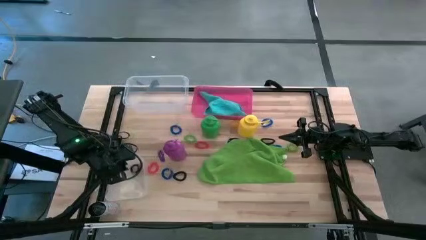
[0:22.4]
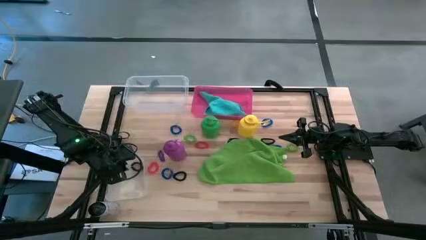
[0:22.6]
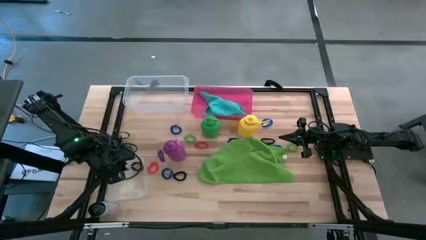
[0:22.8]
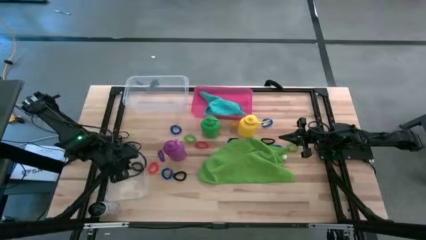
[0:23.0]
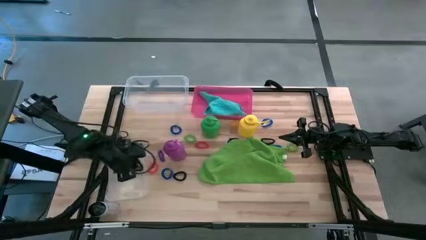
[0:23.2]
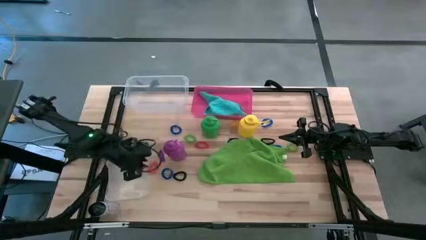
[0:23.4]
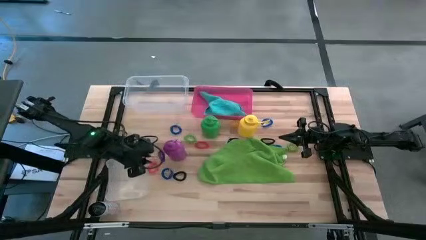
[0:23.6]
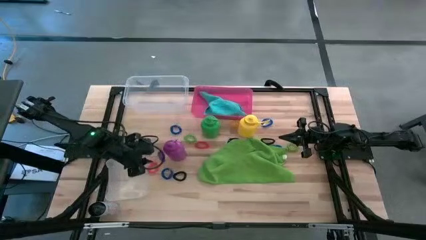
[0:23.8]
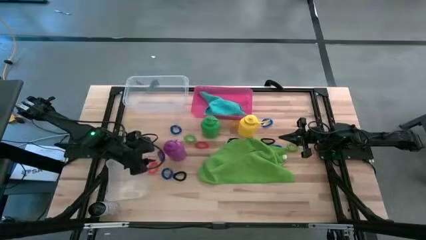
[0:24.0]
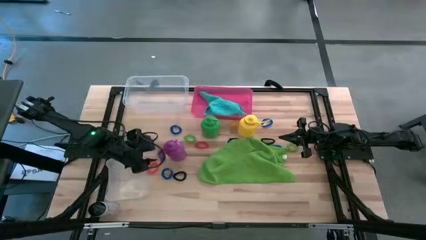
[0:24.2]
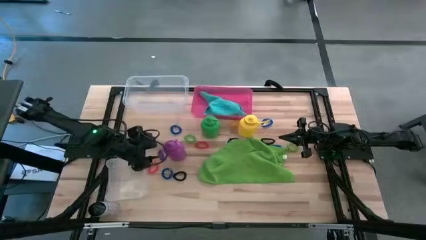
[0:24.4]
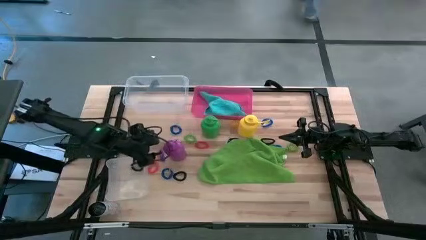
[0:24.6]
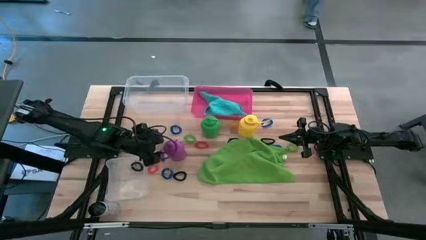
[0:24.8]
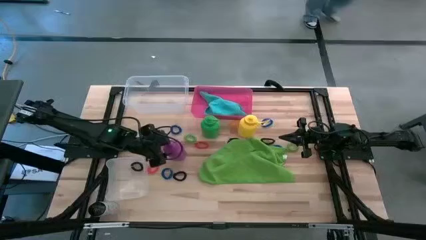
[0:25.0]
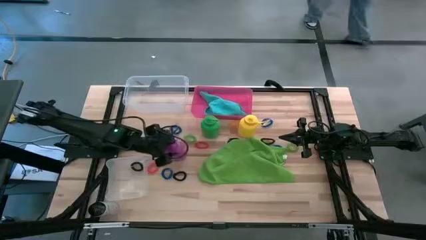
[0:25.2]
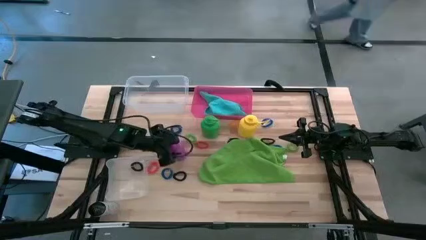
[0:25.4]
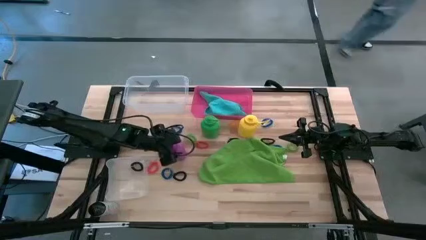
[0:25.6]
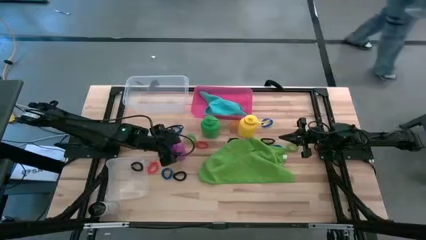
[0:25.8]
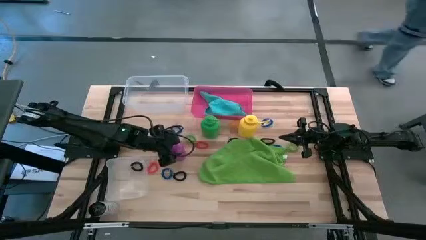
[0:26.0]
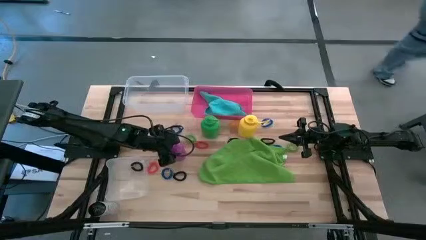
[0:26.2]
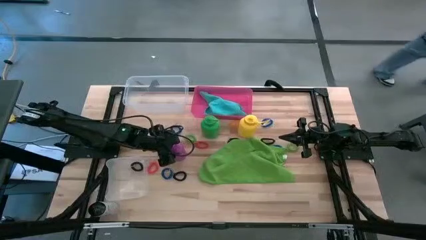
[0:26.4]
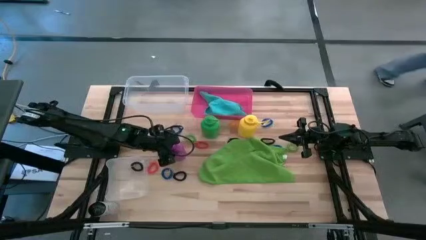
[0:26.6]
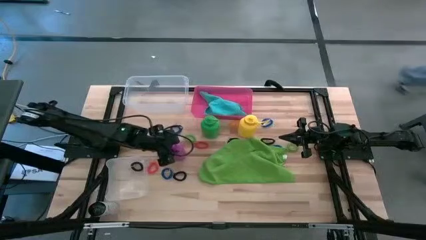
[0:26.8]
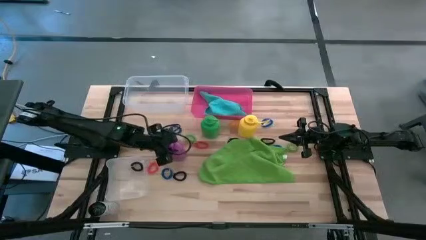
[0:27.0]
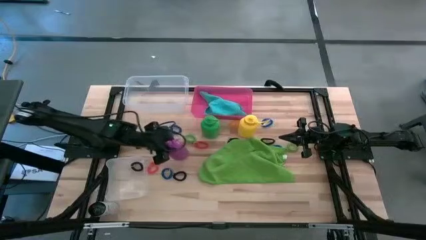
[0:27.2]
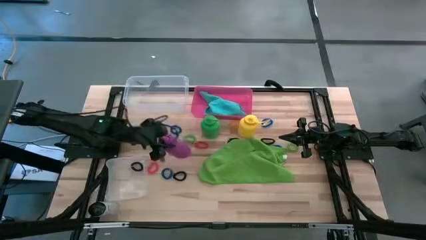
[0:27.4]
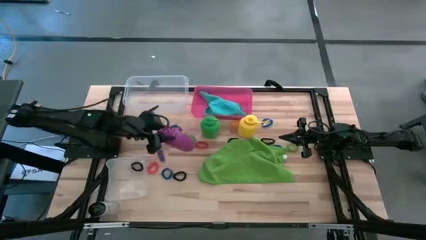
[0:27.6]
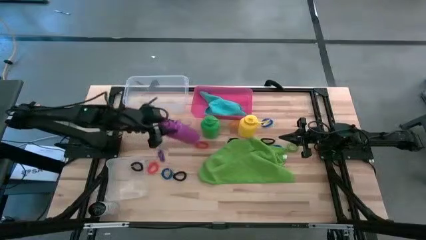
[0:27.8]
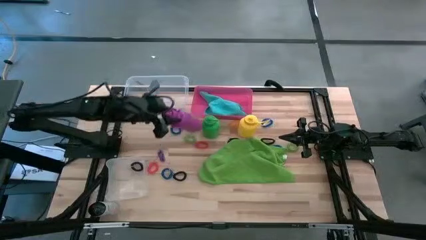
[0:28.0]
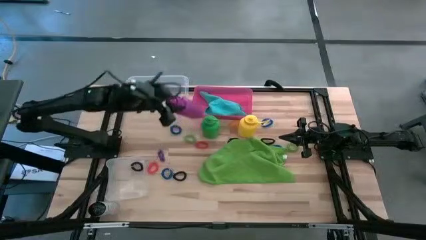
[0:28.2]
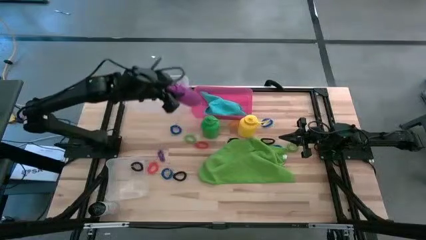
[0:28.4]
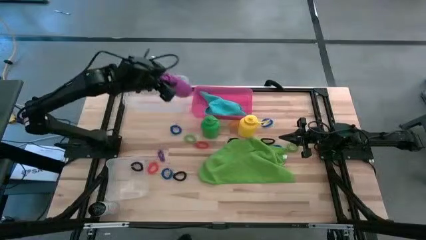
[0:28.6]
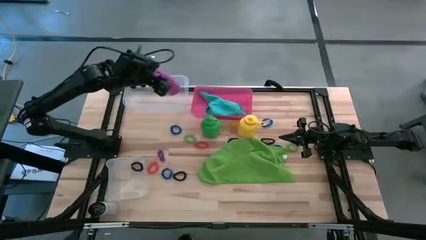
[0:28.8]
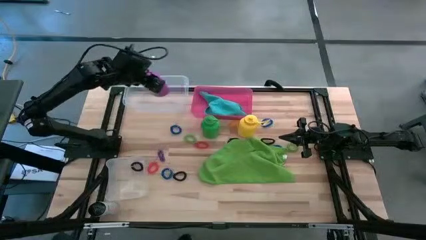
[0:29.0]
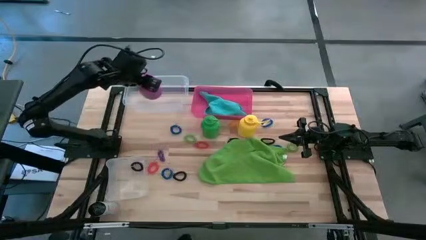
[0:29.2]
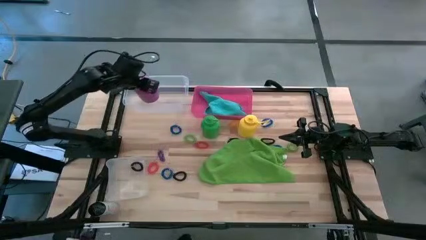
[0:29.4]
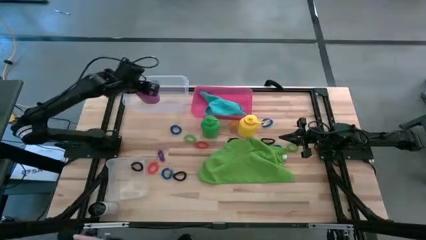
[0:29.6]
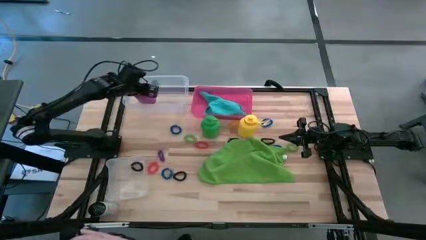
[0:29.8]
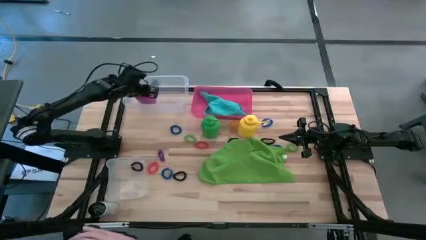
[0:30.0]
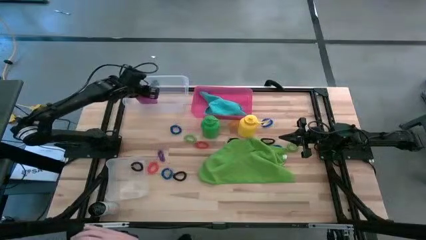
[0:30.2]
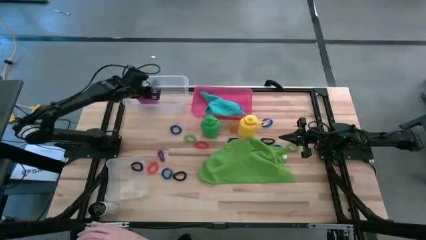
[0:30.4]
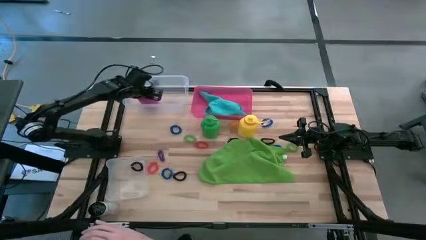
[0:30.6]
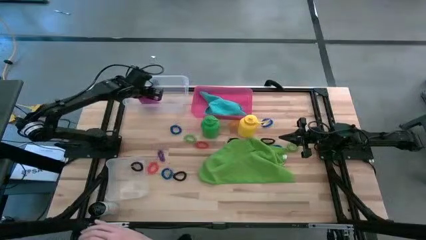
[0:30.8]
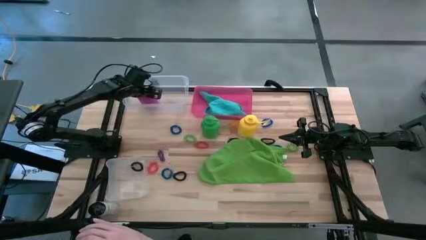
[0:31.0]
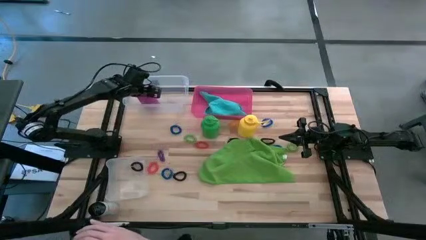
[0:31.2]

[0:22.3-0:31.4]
Task: Pick & Place Sports Items
Put the purple tumbler into the top transparent bin

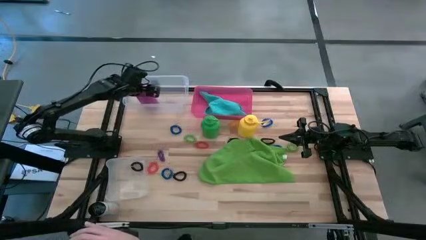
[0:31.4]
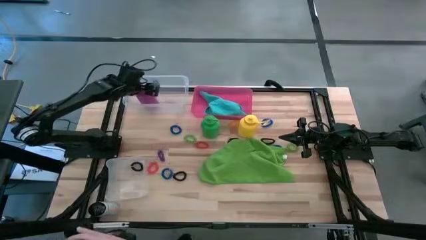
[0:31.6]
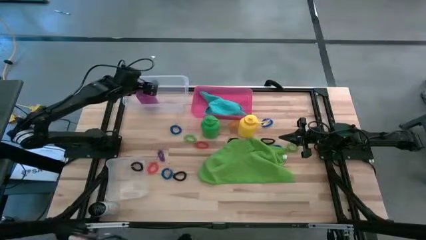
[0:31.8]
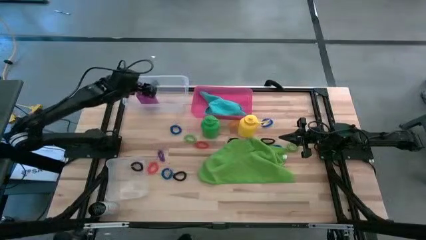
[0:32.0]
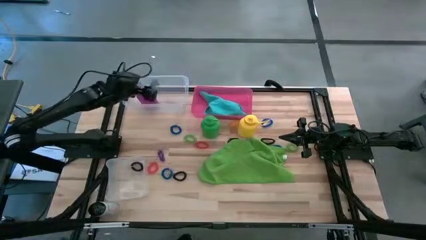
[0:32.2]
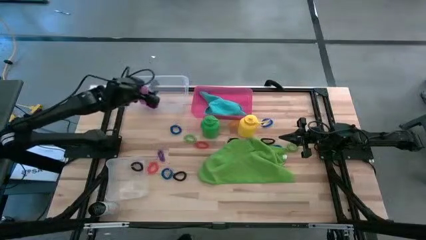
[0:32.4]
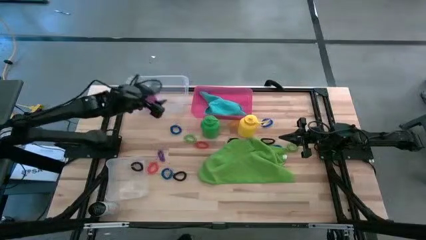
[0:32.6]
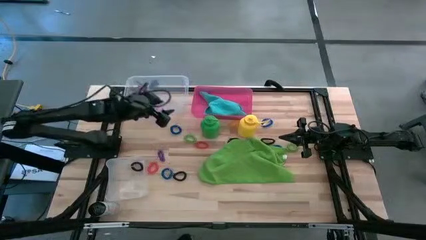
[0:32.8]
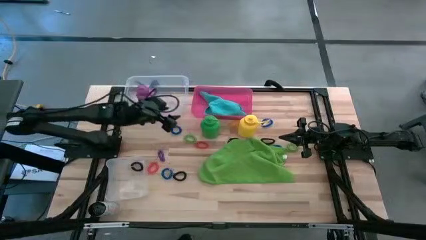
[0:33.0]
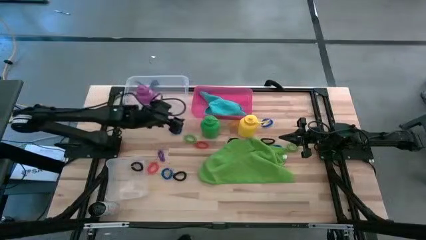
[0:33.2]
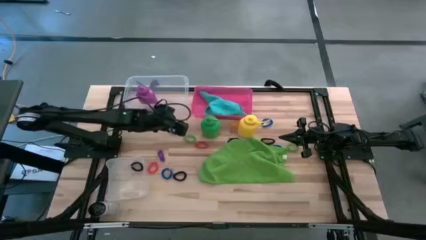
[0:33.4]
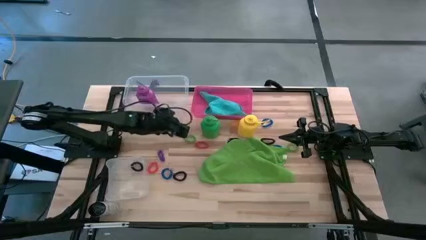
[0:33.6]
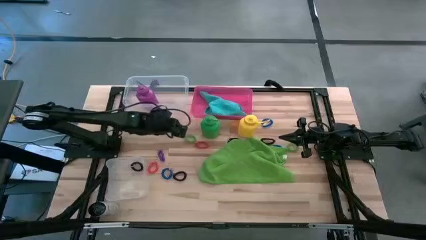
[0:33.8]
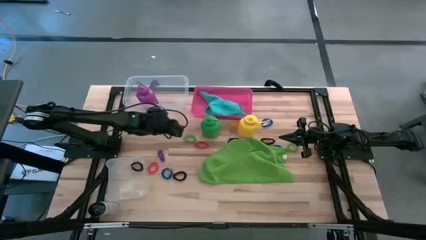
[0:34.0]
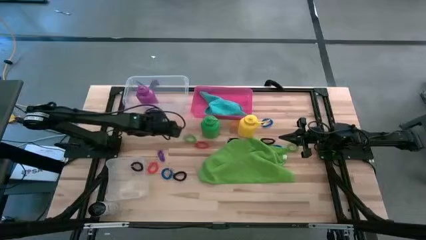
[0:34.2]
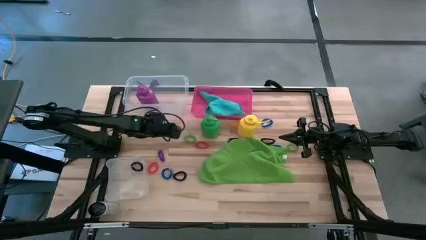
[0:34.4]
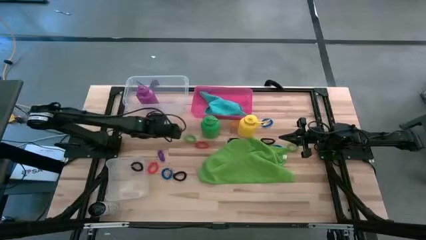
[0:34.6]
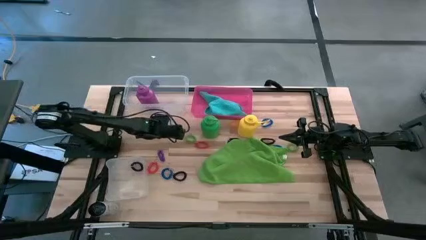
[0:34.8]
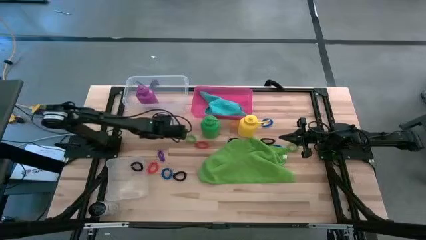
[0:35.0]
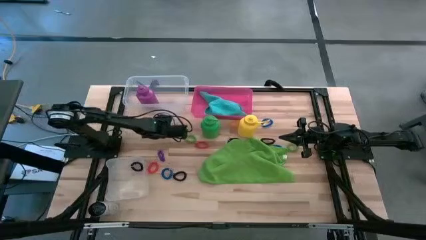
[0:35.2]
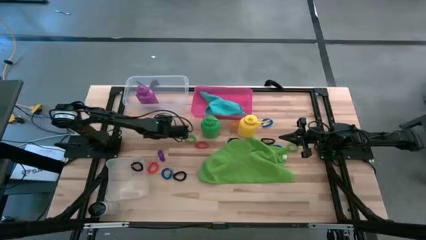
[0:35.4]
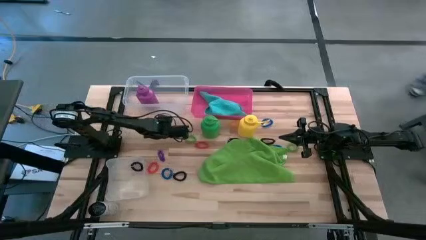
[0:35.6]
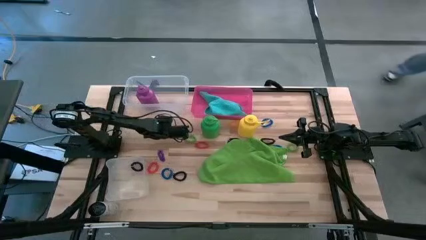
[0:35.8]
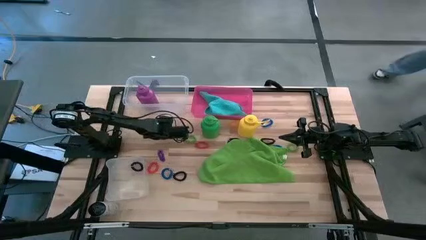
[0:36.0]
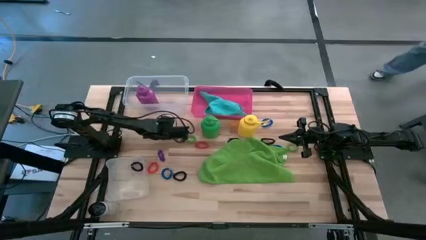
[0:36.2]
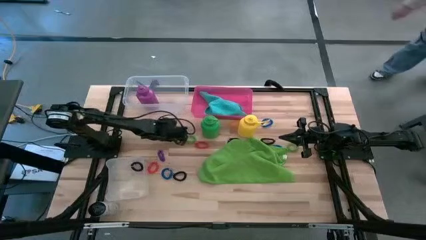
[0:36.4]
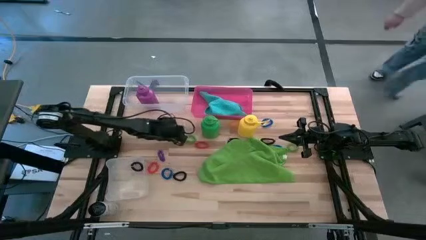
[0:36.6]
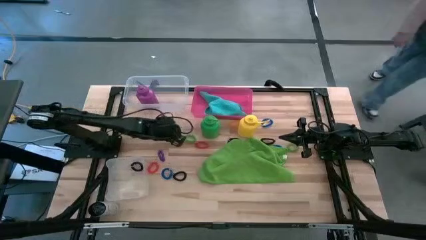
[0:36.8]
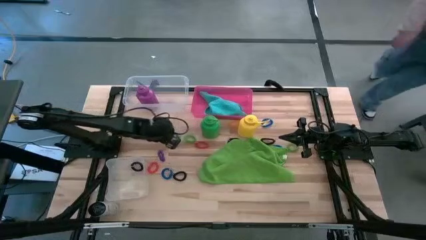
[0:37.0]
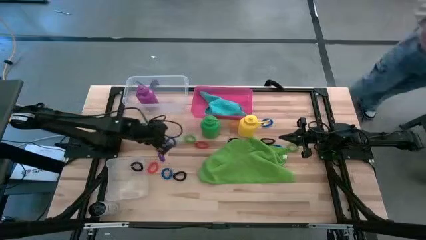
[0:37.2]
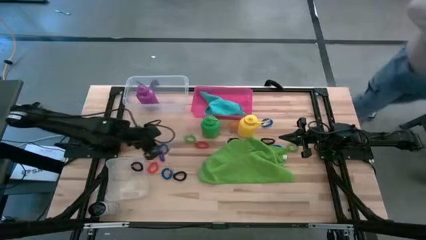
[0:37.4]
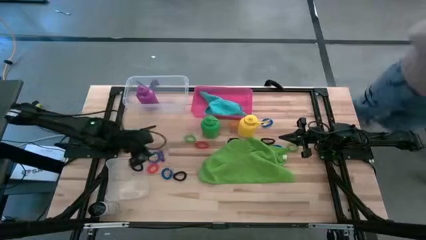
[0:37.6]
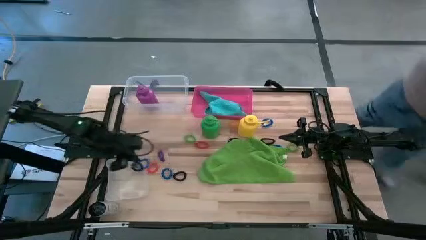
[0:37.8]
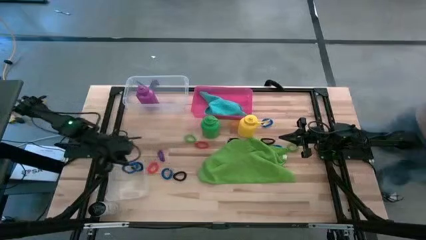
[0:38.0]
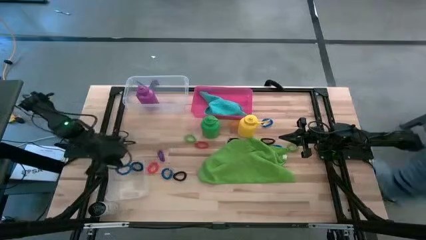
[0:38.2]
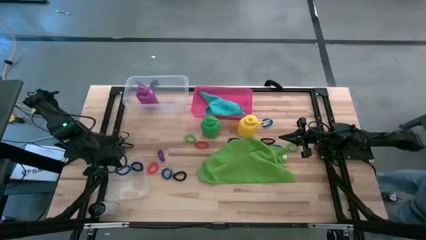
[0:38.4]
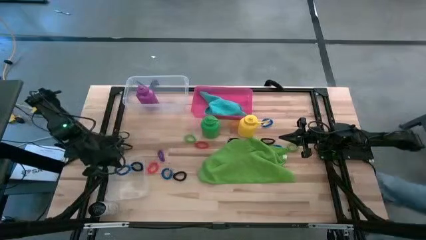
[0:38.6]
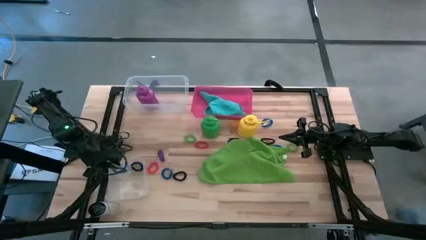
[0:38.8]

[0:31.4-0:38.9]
Put the blue spring keychain into the bottom transparent bin
